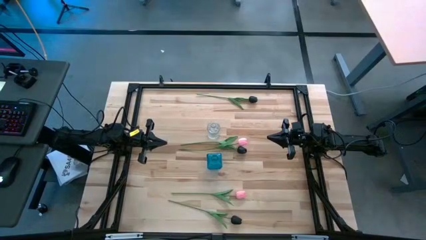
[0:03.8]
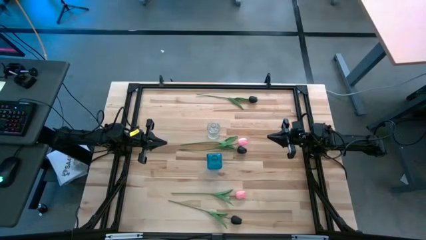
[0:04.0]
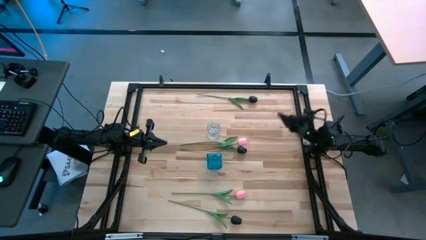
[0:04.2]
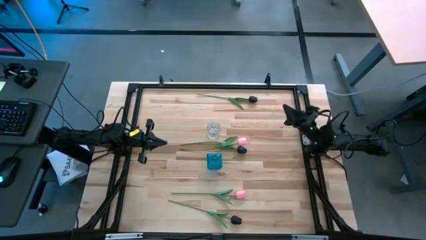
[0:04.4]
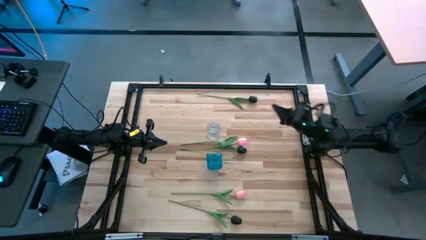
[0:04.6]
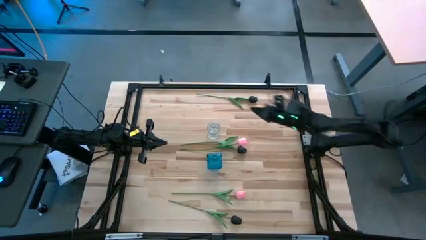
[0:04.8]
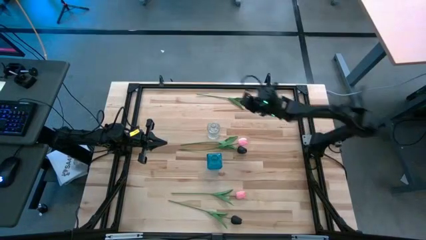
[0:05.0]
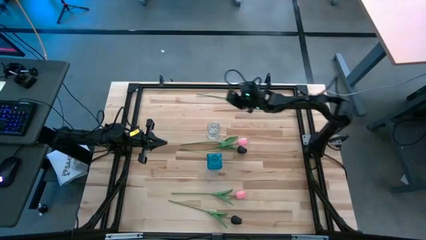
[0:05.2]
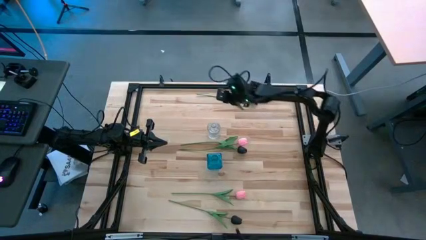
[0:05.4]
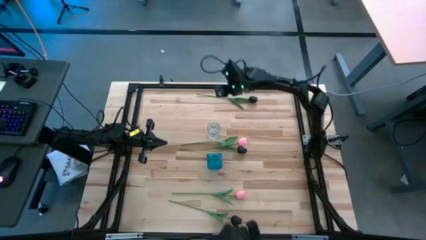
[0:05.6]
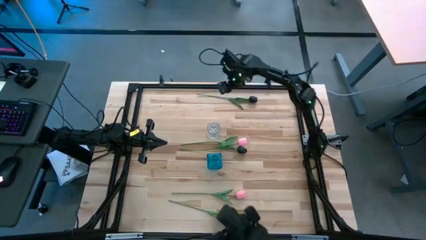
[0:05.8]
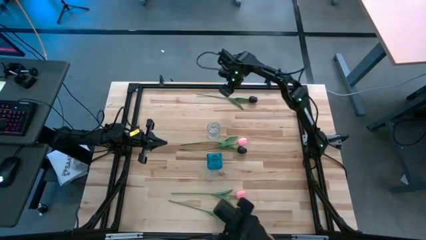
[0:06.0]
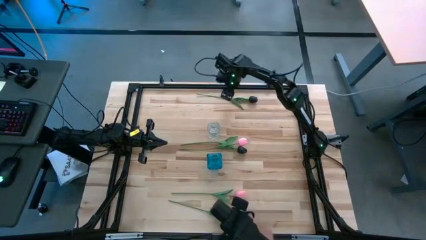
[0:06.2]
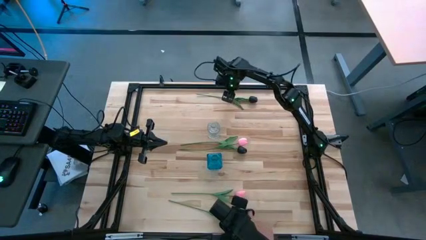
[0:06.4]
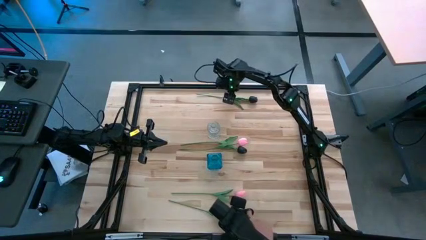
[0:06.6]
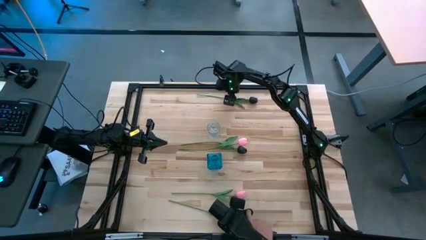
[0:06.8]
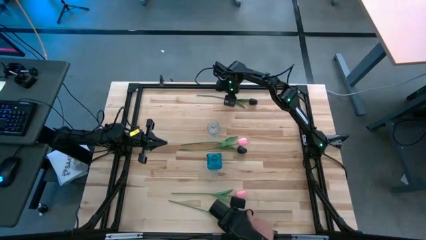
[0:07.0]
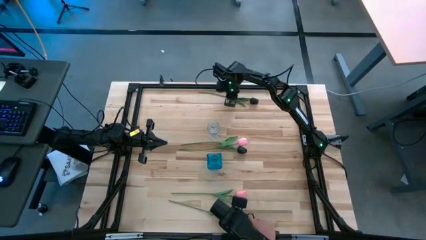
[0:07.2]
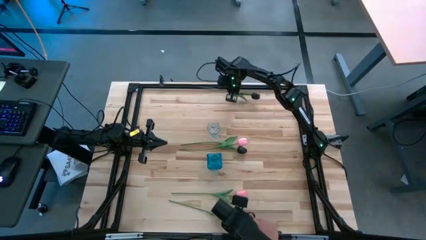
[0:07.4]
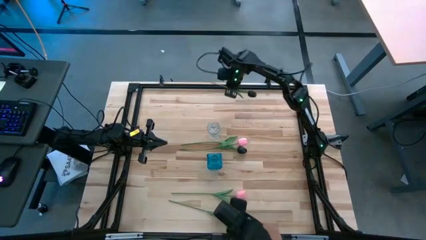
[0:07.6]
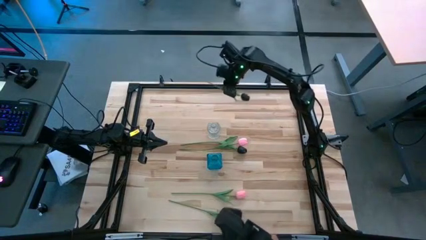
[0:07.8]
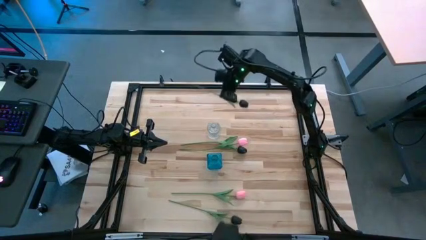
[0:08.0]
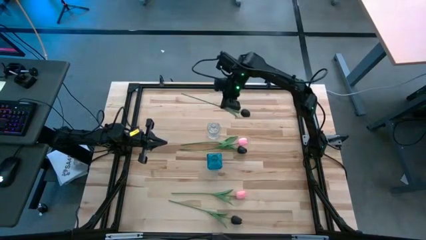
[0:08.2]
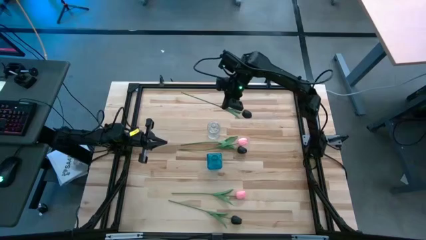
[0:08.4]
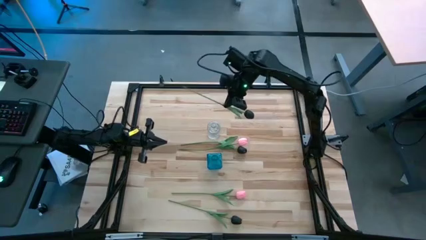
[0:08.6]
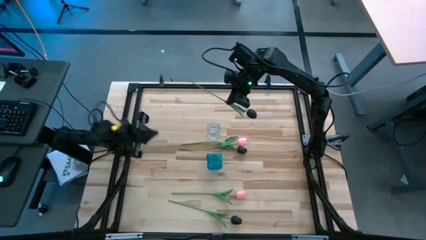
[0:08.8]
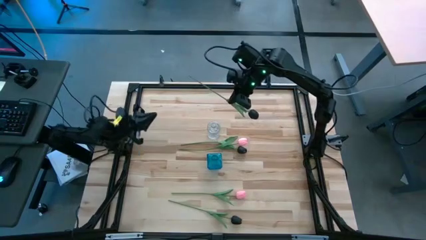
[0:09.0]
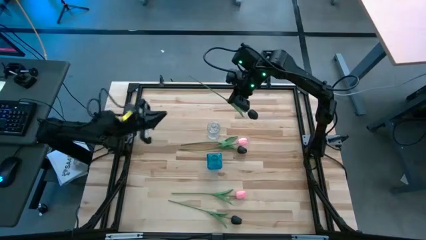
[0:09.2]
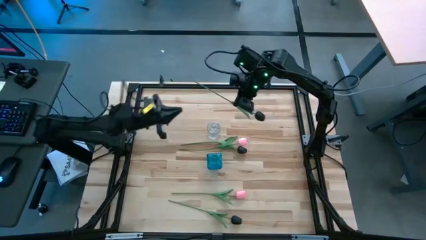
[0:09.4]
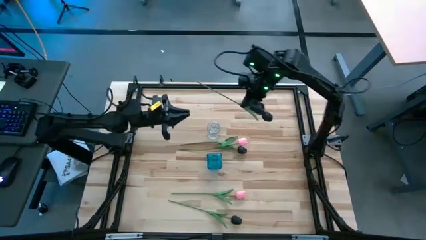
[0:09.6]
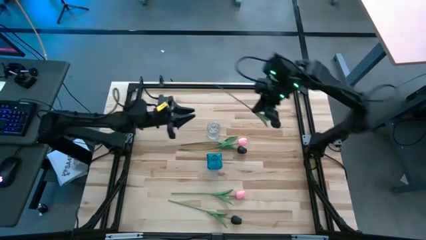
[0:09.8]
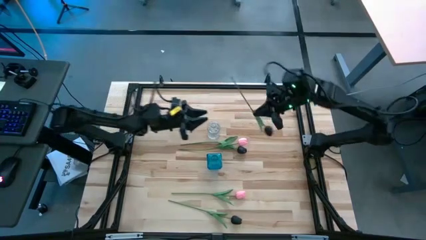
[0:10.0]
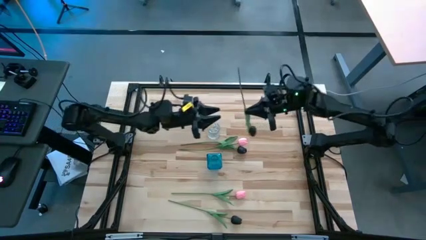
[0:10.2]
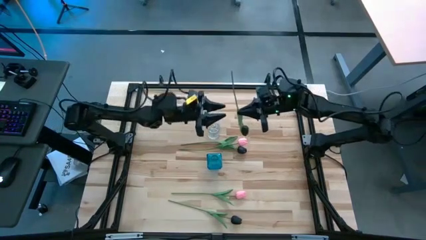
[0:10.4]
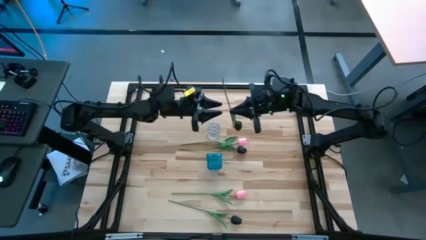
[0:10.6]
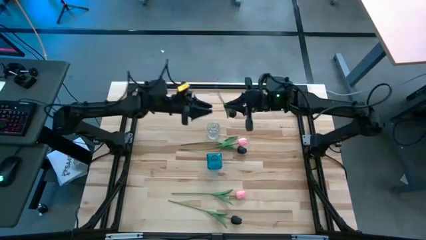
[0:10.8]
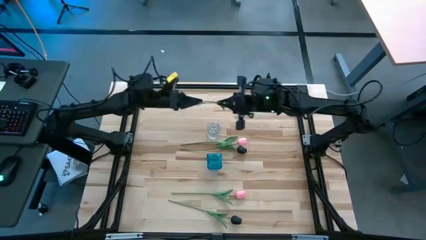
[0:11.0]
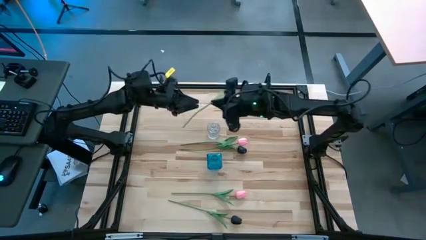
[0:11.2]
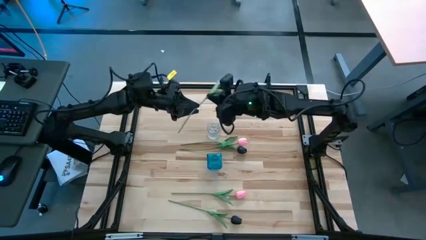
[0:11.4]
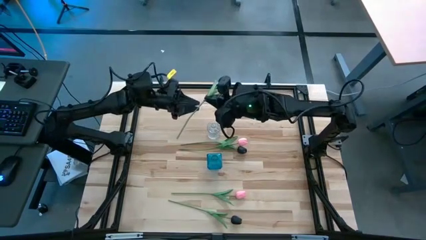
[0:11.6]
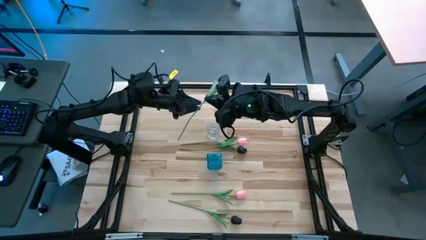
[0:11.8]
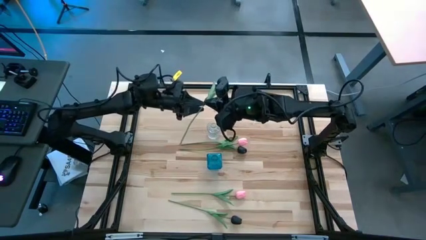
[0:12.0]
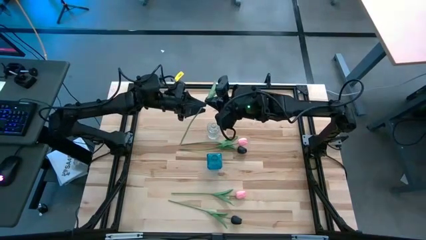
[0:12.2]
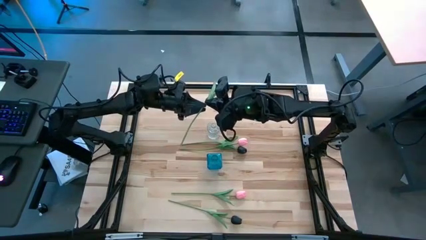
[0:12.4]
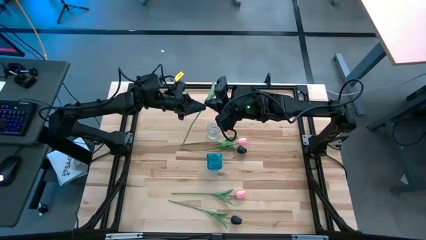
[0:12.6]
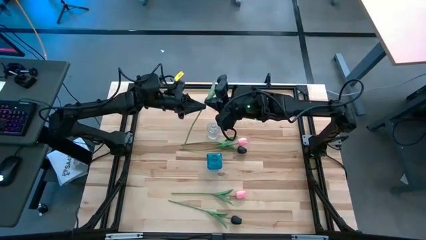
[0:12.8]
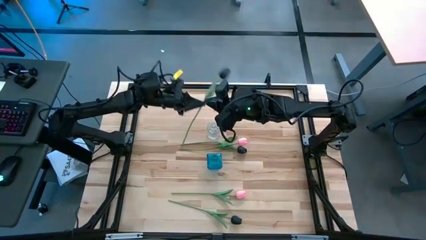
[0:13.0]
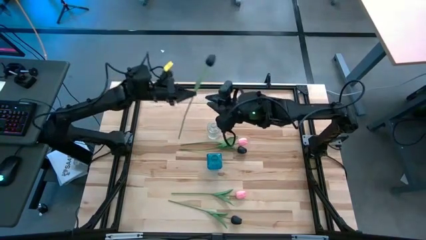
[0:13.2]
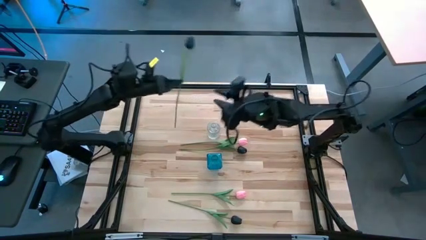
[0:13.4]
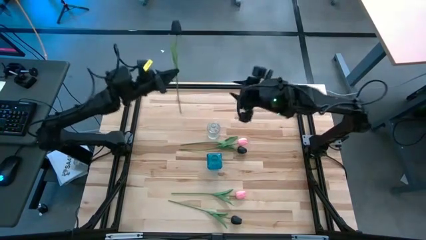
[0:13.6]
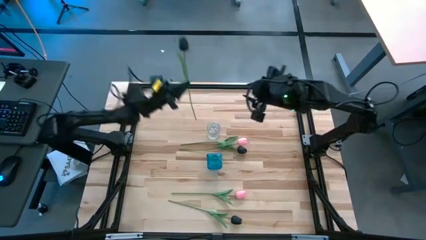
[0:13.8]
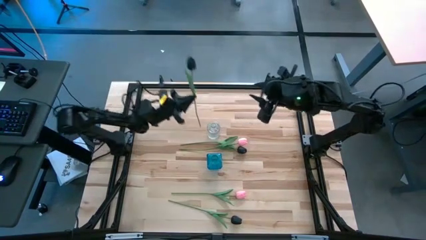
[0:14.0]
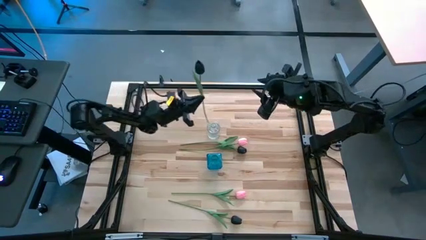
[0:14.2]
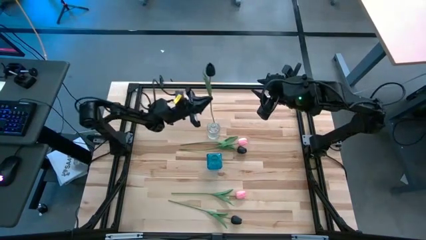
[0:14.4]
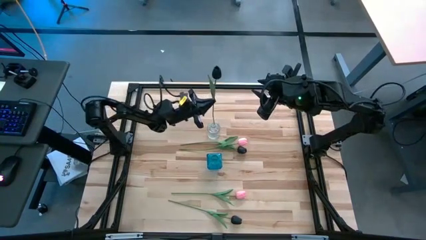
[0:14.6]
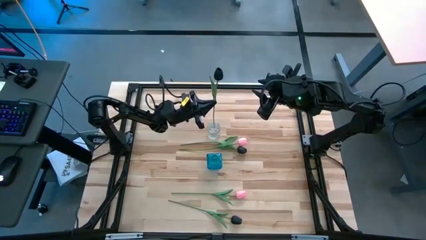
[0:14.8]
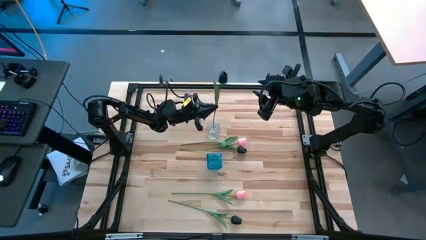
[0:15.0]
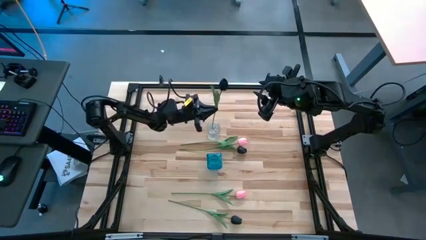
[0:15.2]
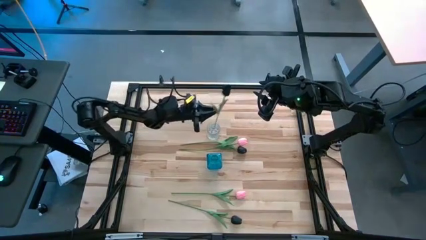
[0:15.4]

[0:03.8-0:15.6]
Task: Sort flowers into vase by color
Put the top black flower into the transparent vase
